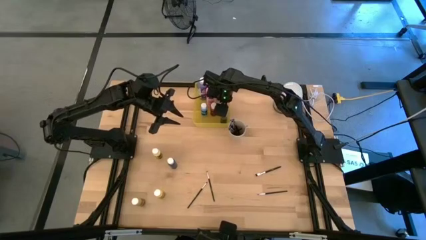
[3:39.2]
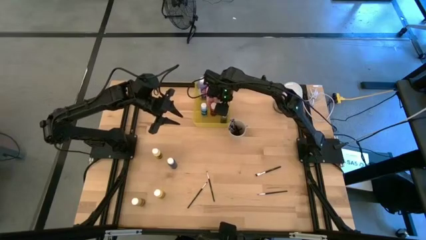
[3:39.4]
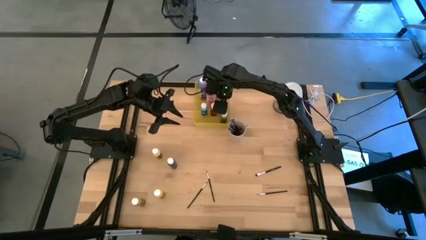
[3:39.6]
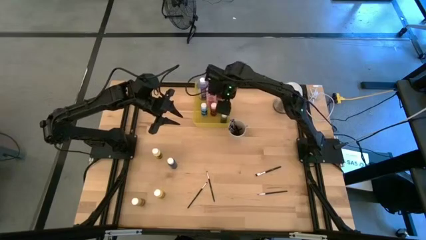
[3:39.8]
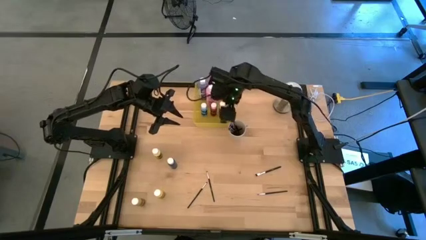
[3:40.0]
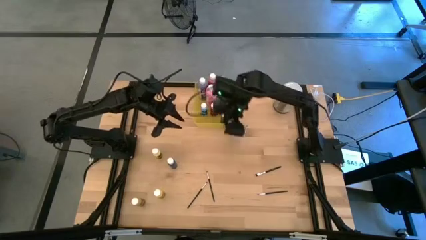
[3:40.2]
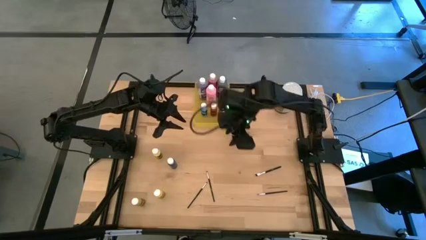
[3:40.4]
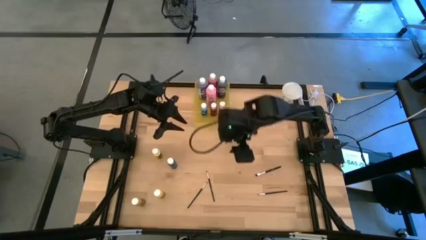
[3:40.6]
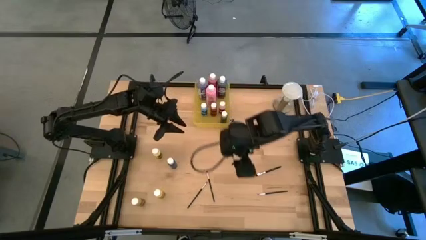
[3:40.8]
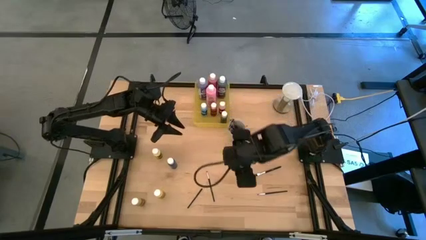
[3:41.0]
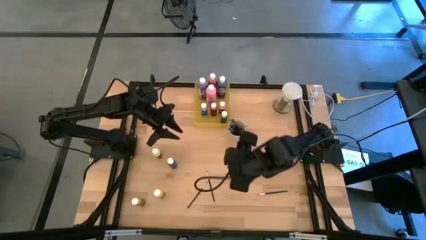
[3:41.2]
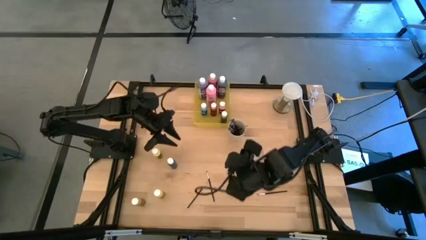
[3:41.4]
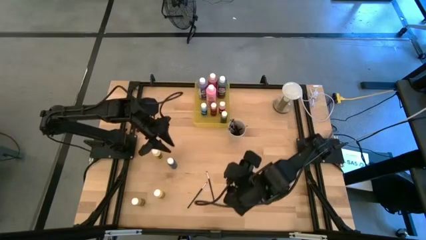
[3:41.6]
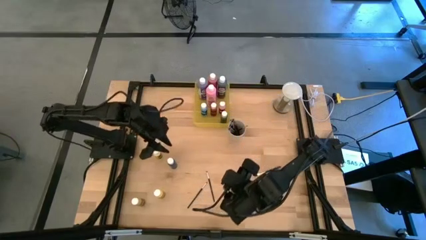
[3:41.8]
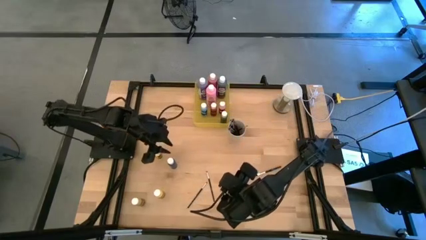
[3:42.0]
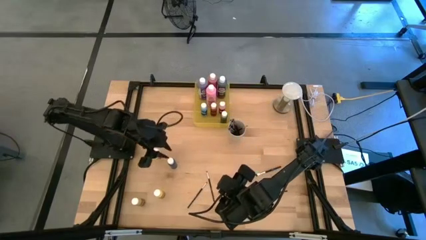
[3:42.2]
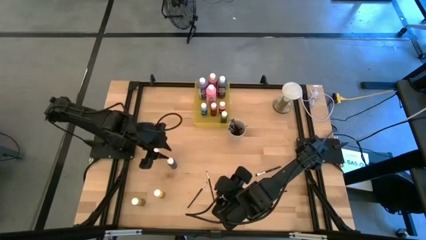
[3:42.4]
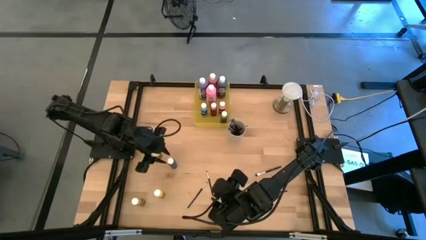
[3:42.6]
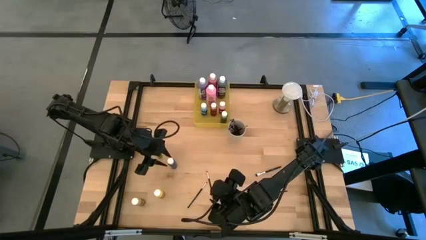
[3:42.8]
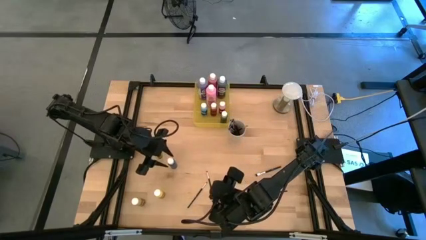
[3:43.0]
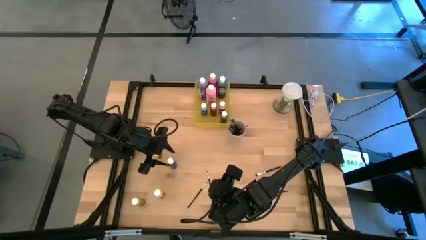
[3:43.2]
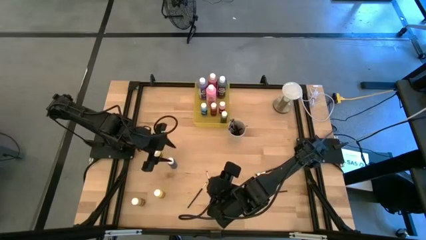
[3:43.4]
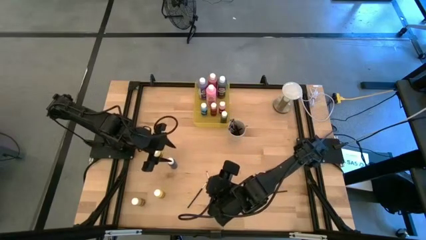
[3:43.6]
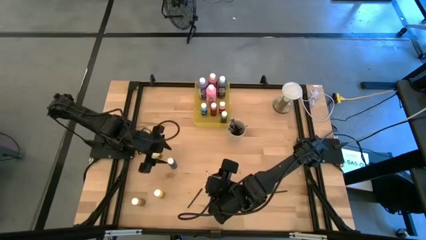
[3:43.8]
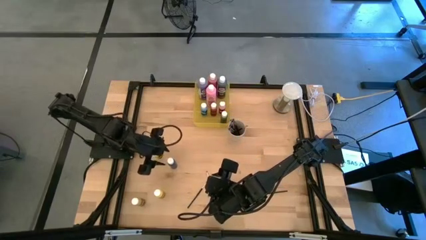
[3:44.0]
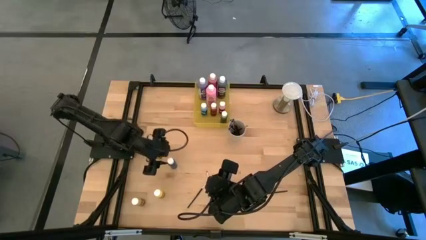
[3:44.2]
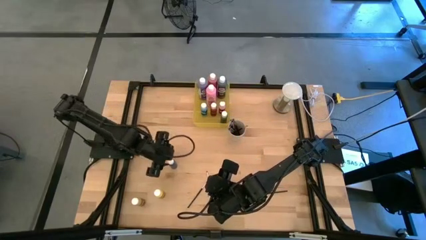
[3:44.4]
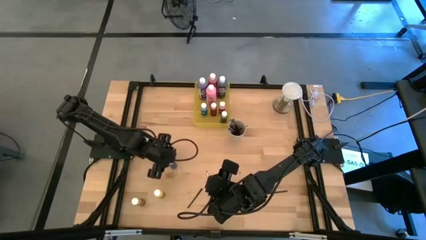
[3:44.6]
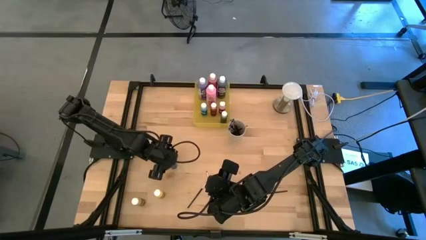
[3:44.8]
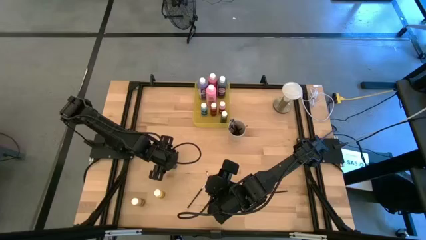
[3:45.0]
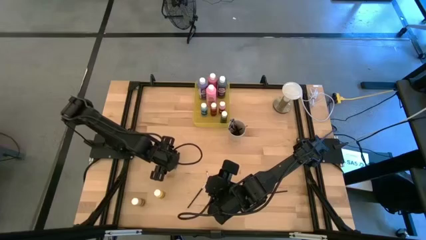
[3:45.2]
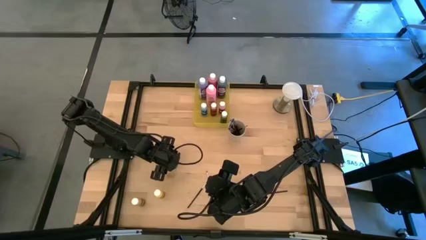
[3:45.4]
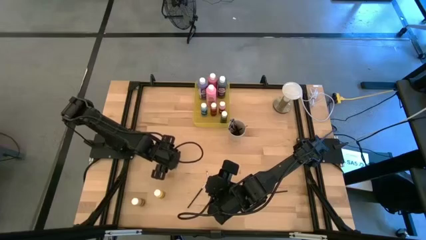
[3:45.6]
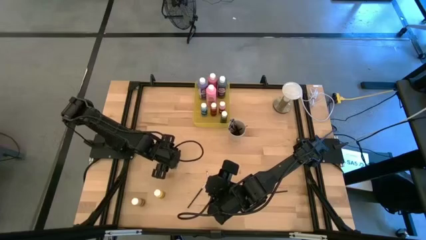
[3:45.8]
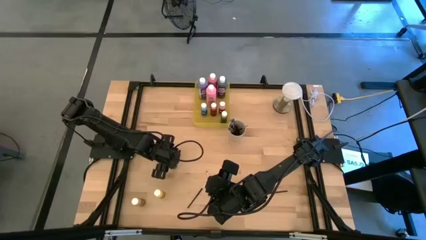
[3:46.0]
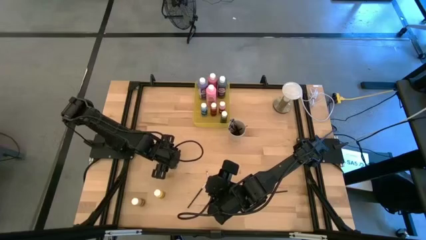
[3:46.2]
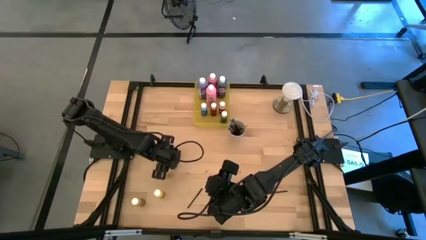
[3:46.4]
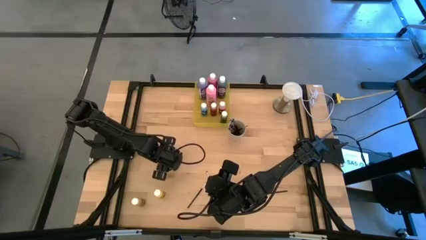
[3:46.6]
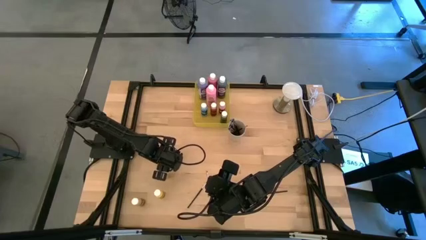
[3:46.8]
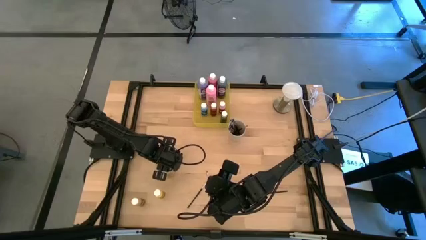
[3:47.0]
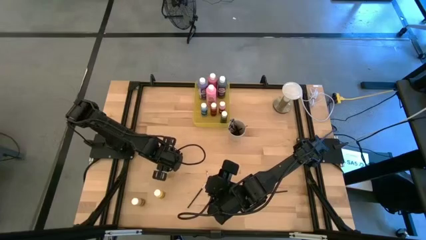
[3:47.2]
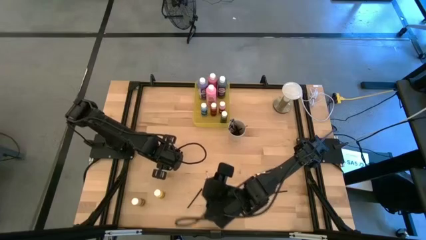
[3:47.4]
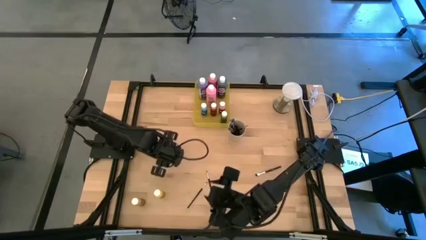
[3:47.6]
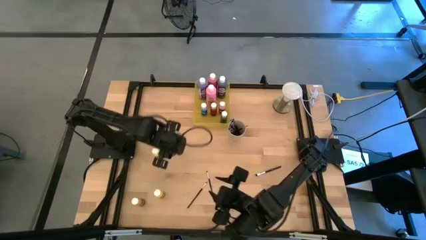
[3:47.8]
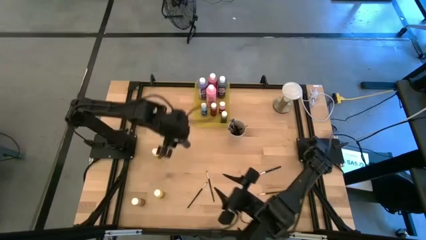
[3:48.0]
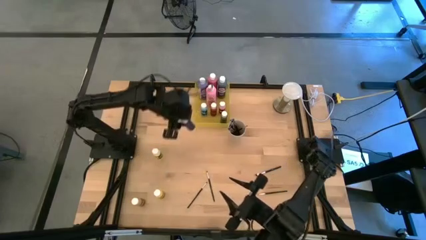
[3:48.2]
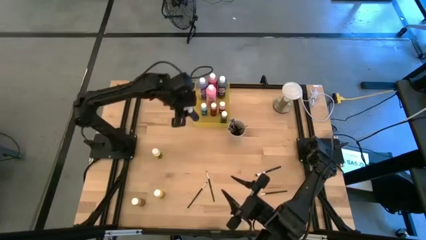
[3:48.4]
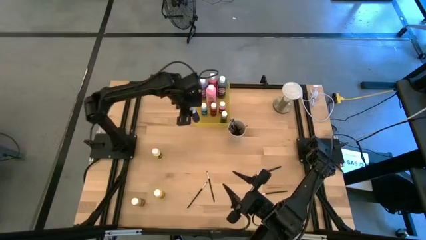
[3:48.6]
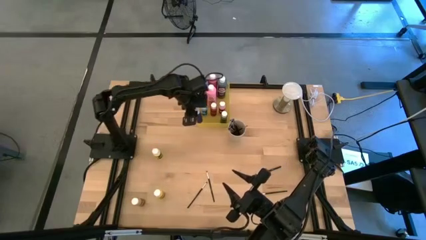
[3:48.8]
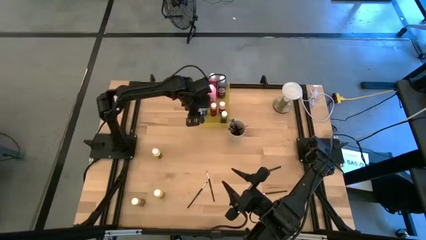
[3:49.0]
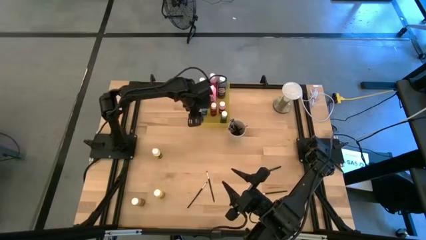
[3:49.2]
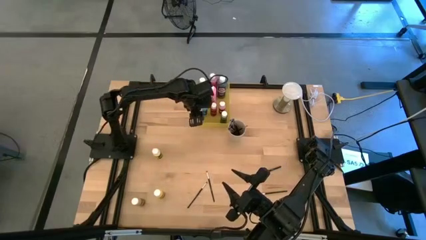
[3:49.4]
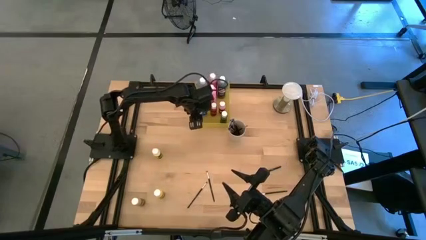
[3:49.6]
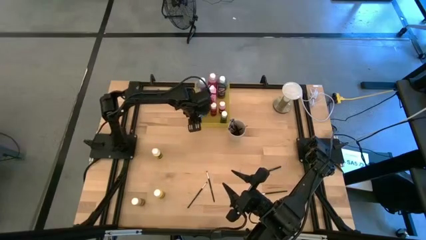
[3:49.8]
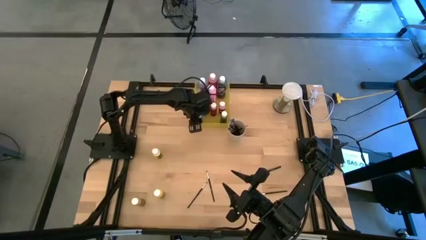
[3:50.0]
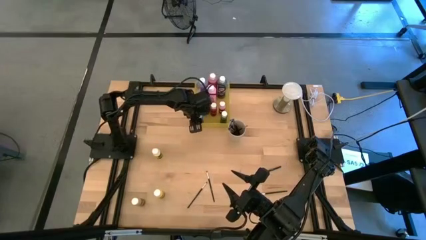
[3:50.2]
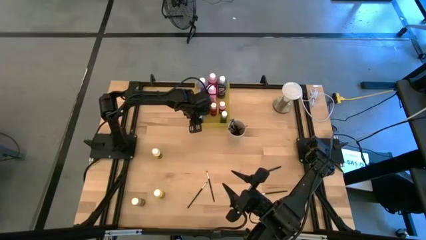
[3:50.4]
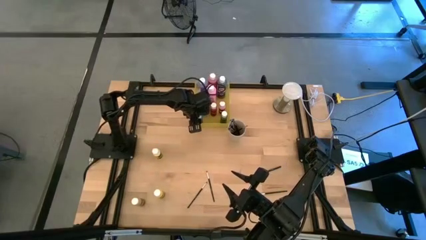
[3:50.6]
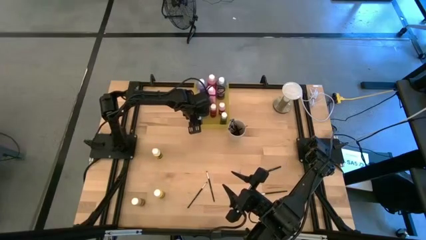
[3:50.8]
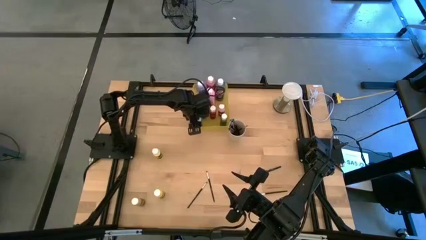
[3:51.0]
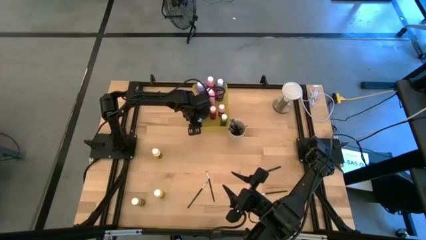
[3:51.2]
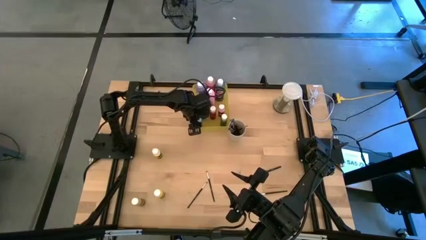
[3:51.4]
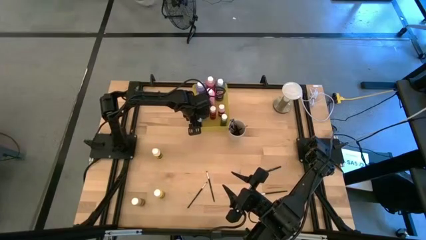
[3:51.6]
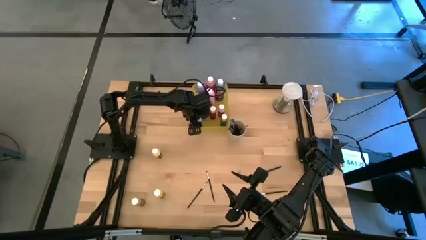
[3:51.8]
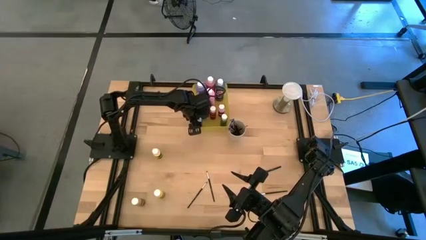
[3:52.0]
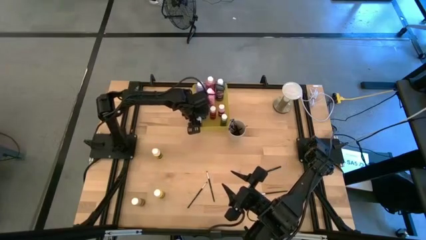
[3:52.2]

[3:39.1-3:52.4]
Task: Pick & Place Paint Supplies
Put the small dark blue paint bottle into the yellow bin

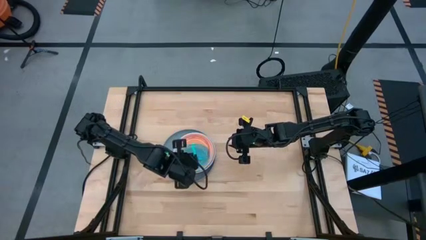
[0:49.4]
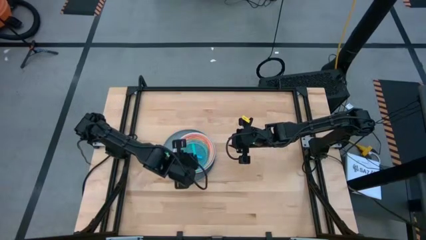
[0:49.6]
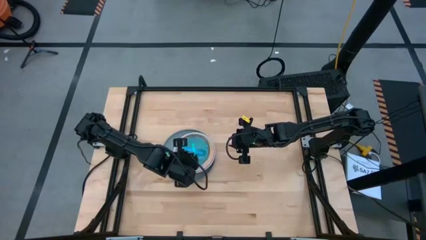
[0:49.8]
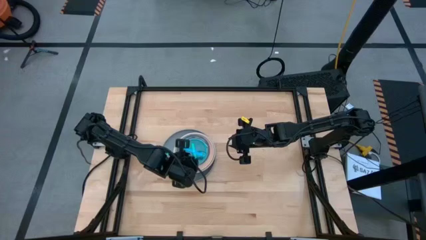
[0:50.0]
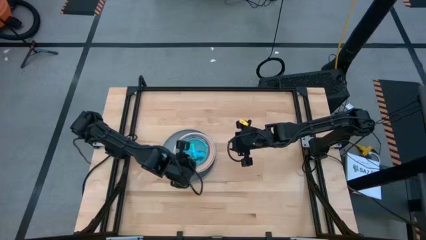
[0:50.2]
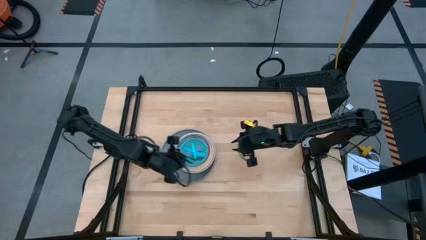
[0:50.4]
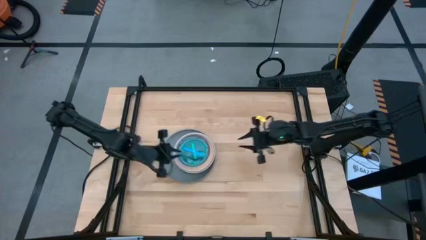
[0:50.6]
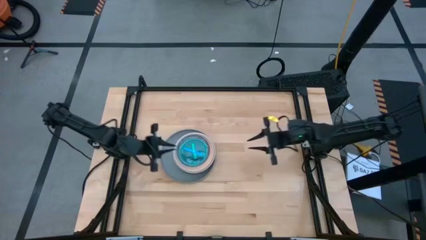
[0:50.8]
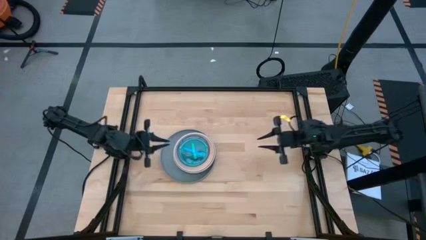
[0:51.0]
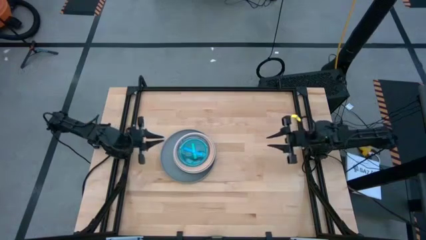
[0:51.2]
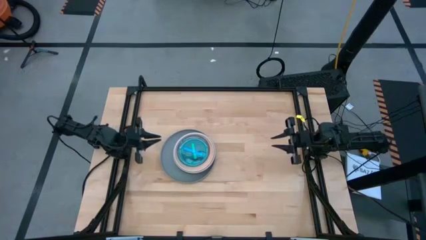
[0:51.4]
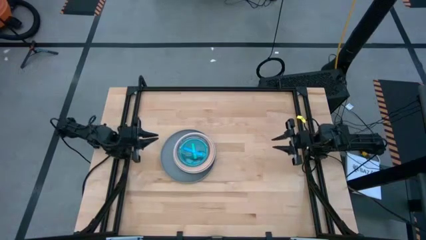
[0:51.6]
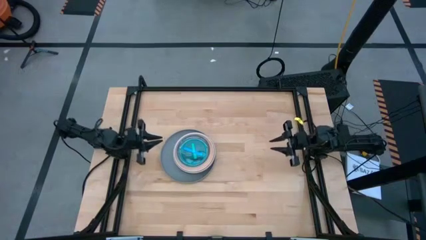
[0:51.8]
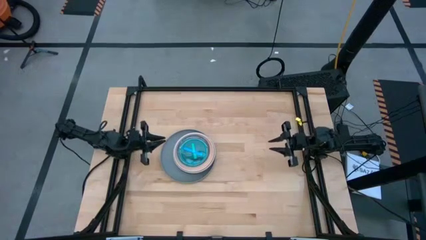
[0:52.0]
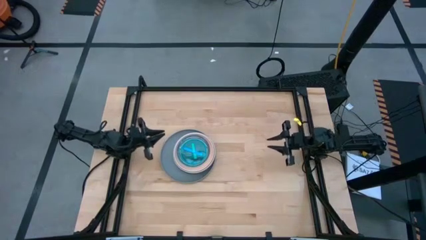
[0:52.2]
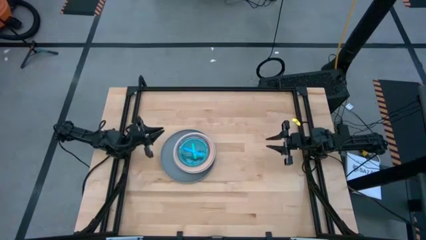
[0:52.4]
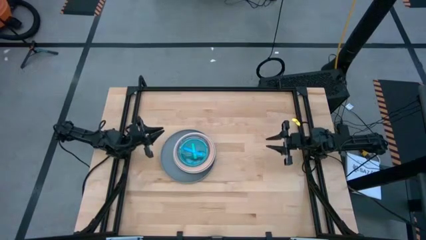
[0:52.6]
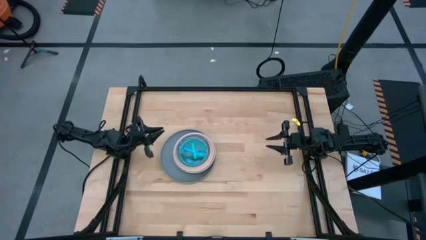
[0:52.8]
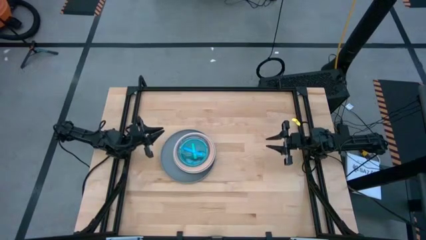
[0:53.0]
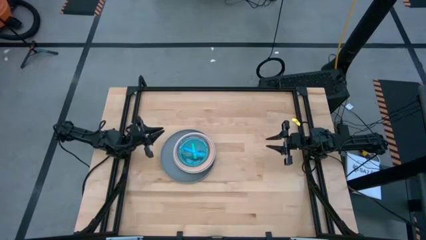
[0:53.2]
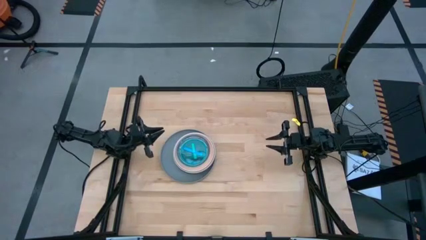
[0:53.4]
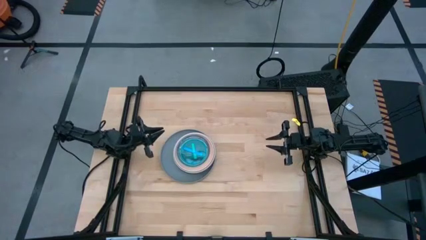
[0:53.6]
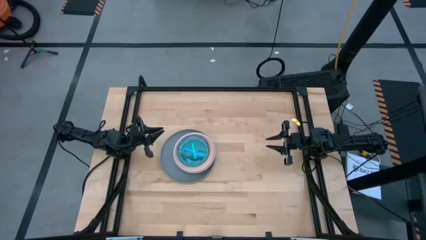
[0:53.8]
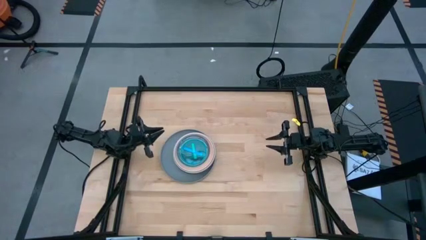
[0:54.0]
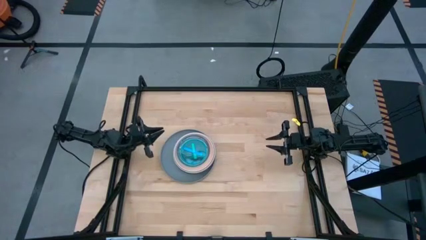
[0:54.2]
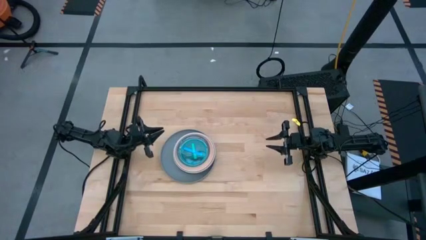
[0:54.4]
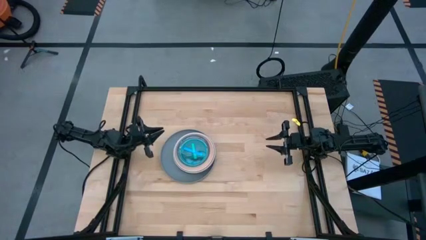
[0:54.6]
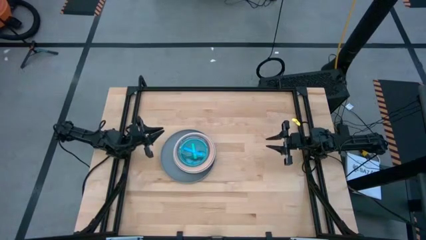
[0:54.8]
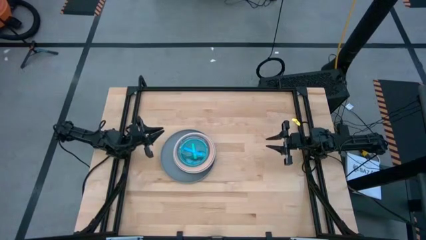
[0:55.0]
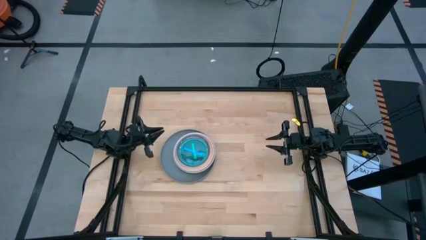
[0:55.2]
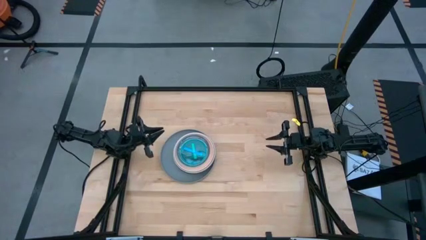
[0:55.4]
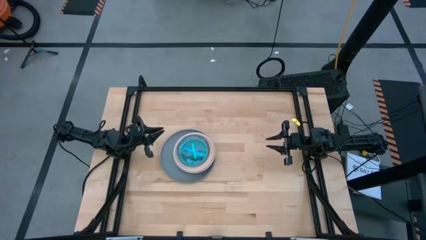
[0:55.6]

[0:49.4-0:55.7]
Task: Stack plastic plates
Return to Home Position
